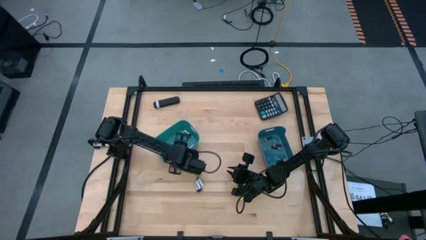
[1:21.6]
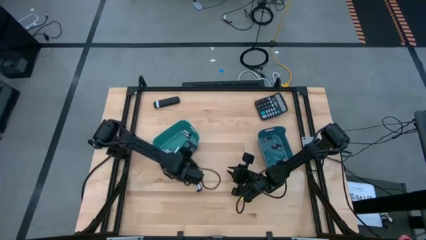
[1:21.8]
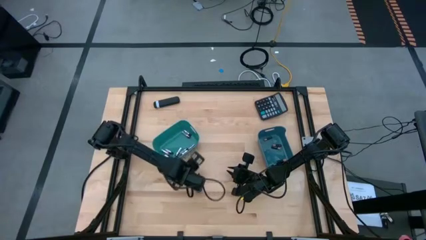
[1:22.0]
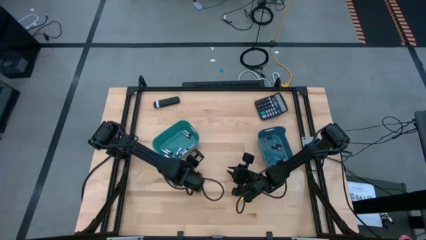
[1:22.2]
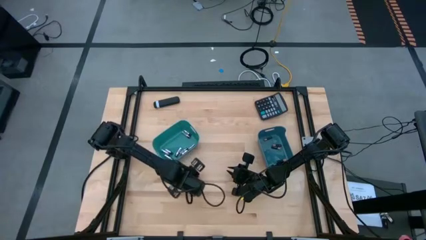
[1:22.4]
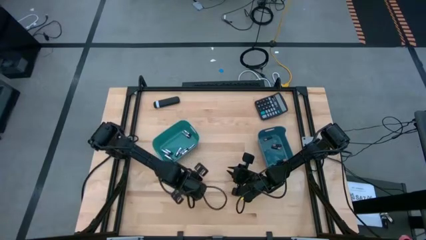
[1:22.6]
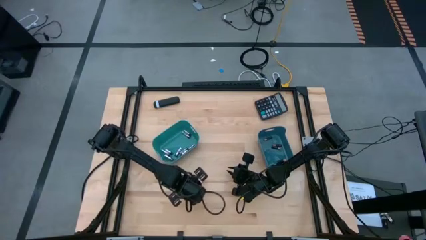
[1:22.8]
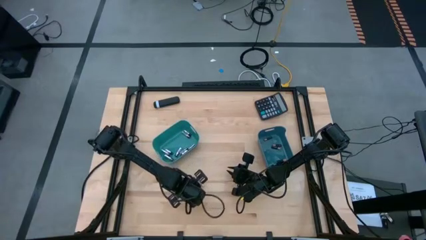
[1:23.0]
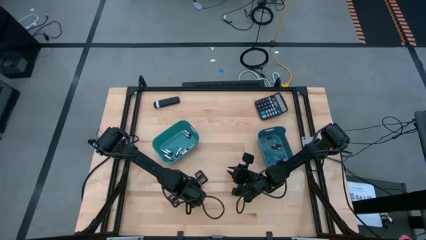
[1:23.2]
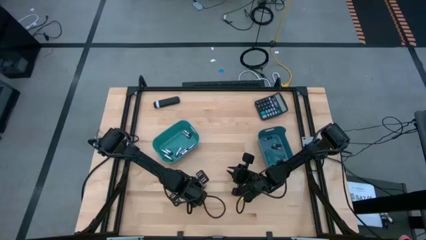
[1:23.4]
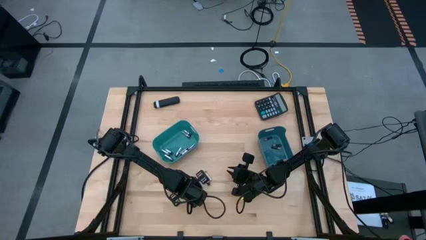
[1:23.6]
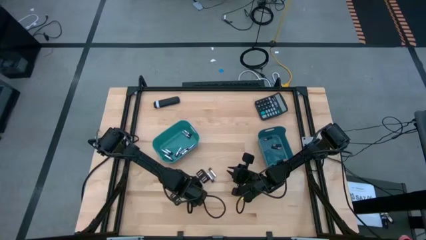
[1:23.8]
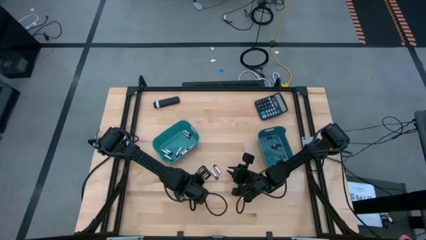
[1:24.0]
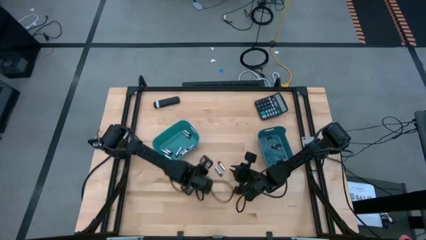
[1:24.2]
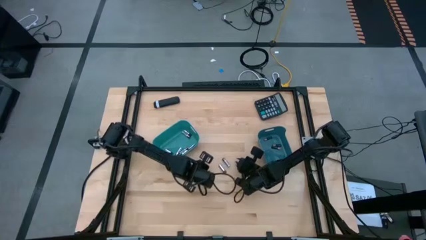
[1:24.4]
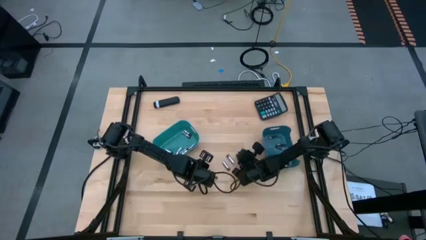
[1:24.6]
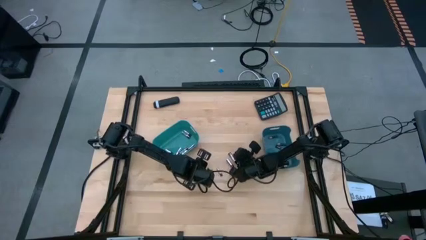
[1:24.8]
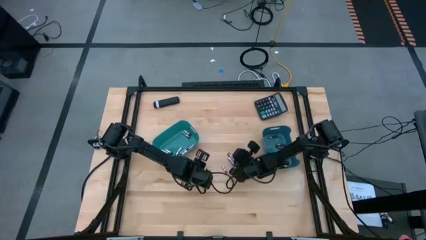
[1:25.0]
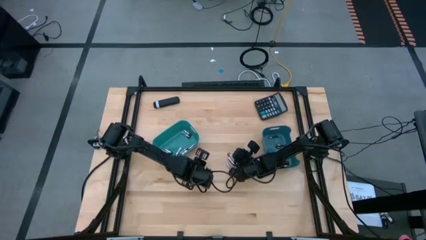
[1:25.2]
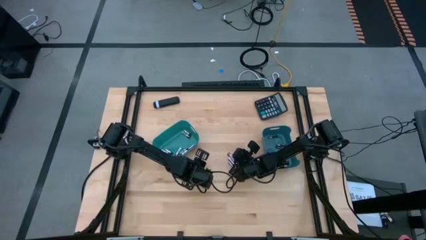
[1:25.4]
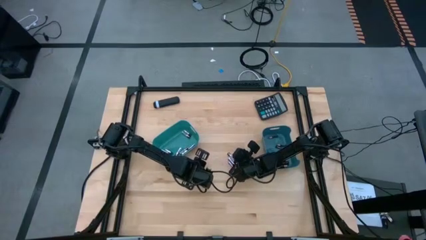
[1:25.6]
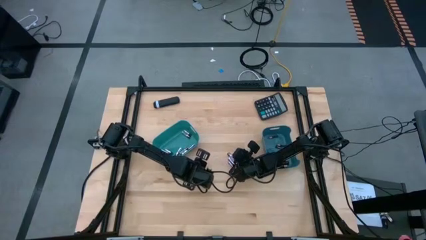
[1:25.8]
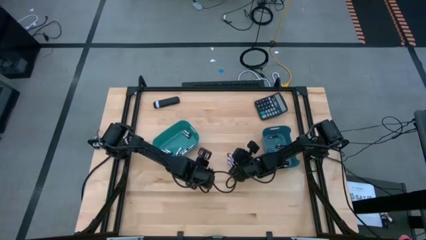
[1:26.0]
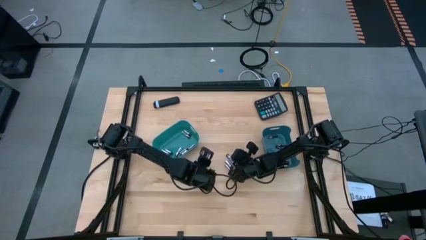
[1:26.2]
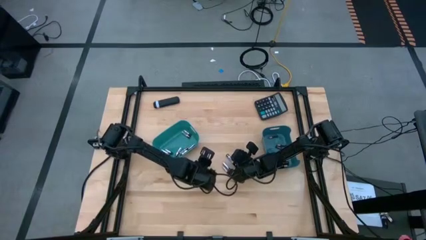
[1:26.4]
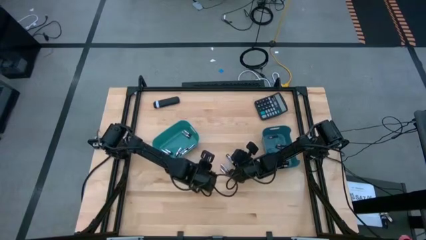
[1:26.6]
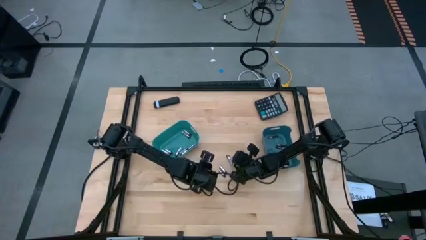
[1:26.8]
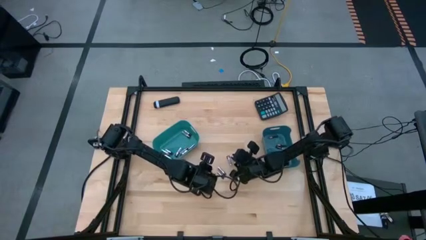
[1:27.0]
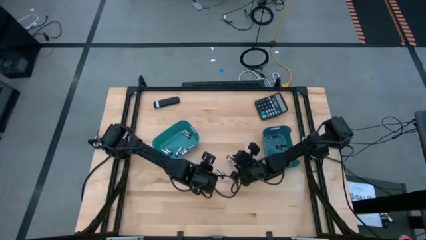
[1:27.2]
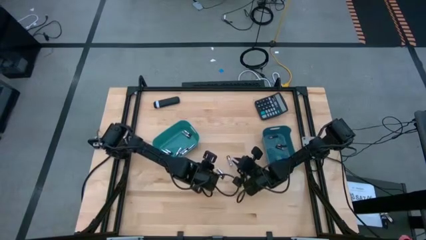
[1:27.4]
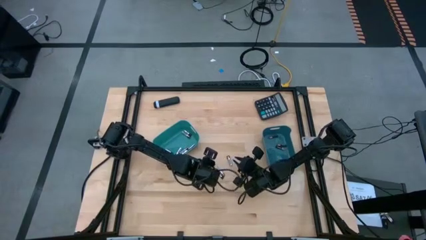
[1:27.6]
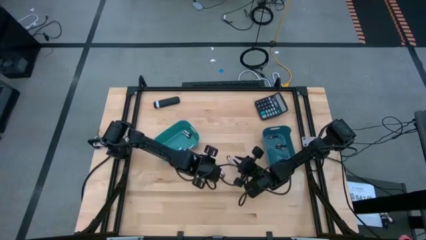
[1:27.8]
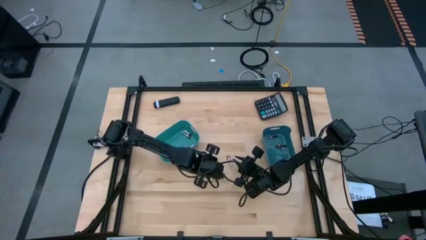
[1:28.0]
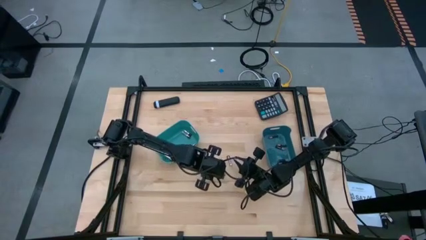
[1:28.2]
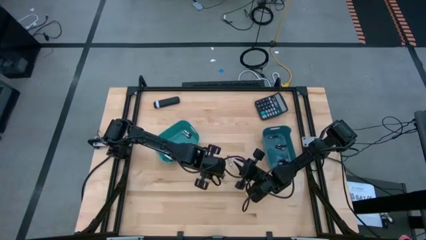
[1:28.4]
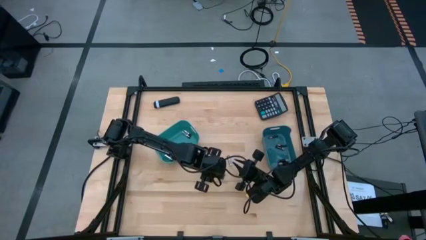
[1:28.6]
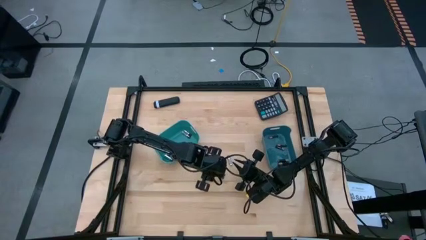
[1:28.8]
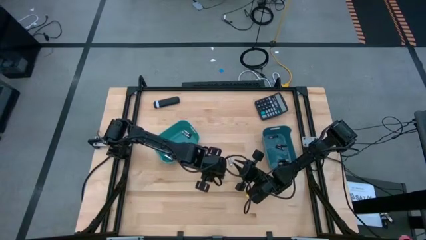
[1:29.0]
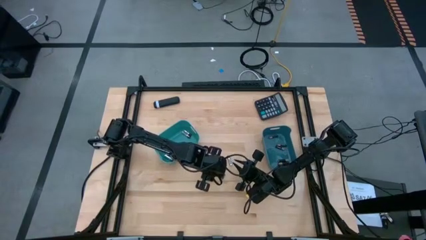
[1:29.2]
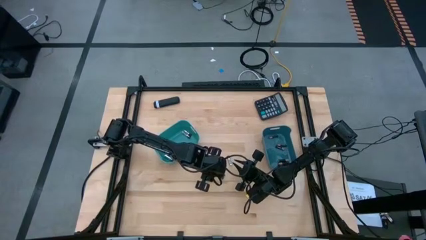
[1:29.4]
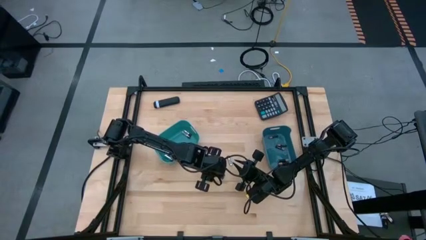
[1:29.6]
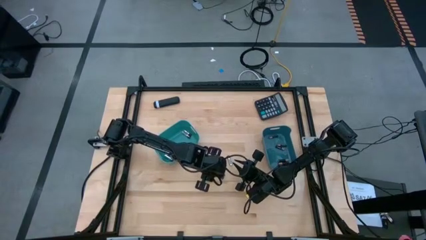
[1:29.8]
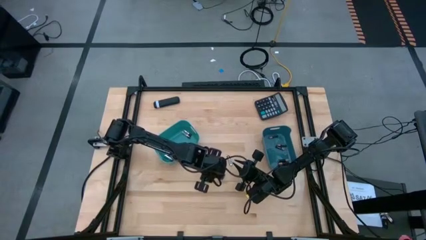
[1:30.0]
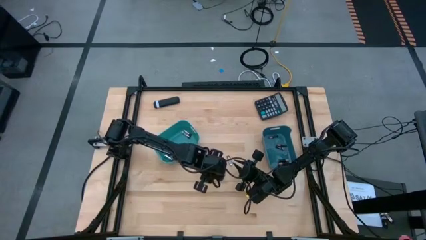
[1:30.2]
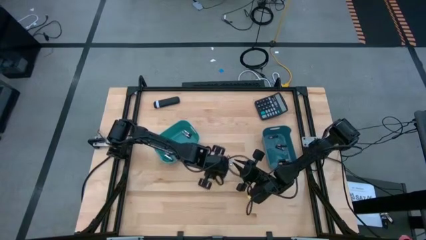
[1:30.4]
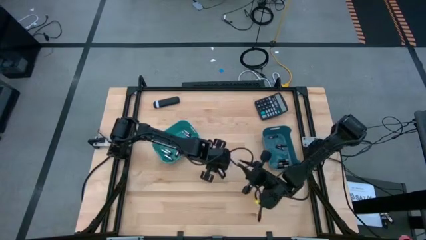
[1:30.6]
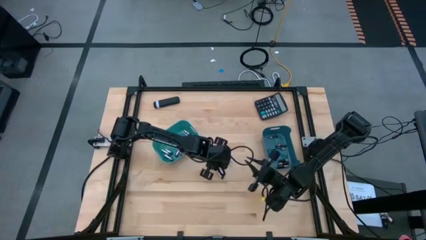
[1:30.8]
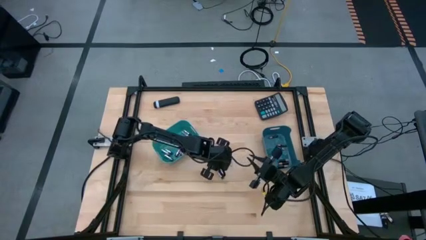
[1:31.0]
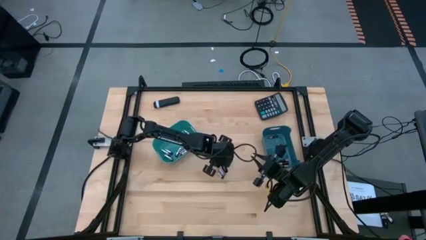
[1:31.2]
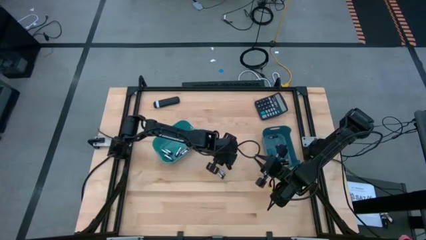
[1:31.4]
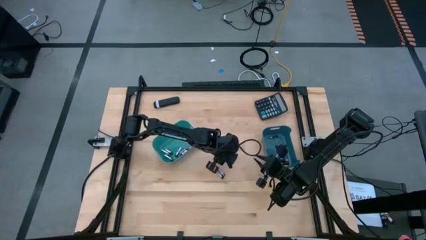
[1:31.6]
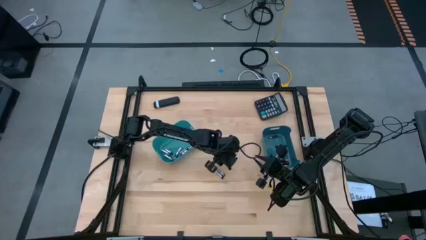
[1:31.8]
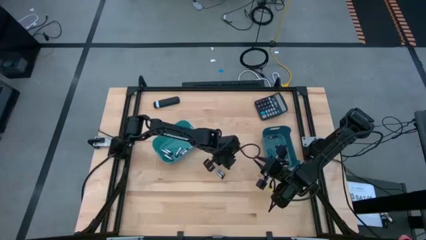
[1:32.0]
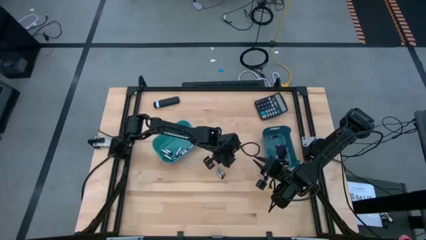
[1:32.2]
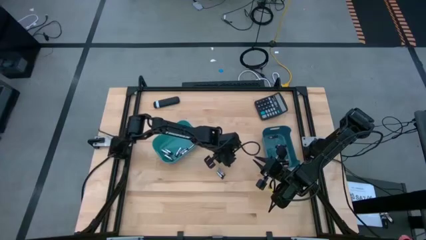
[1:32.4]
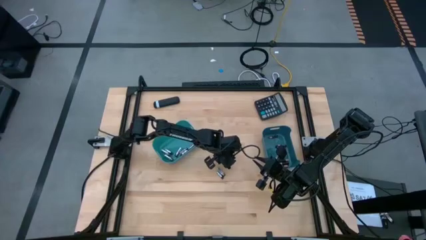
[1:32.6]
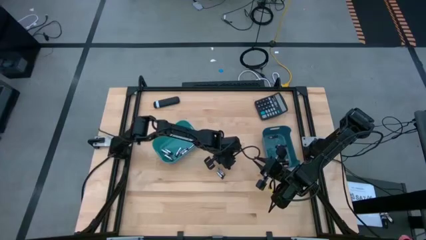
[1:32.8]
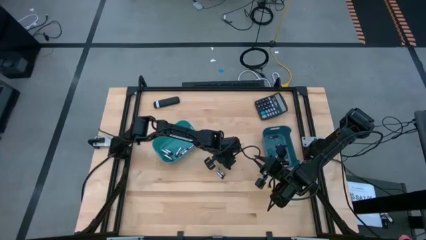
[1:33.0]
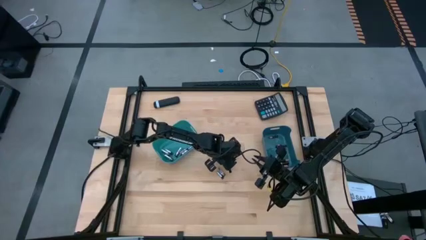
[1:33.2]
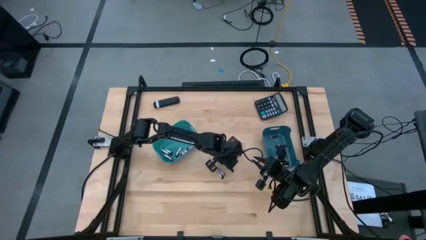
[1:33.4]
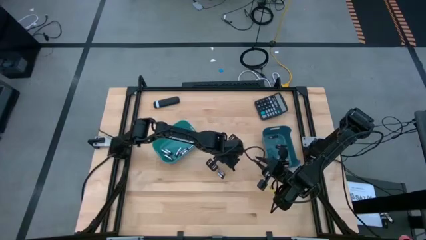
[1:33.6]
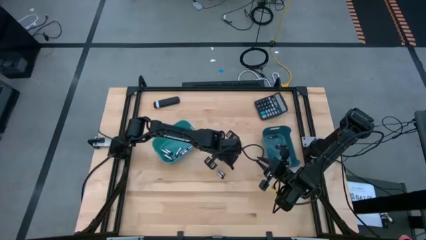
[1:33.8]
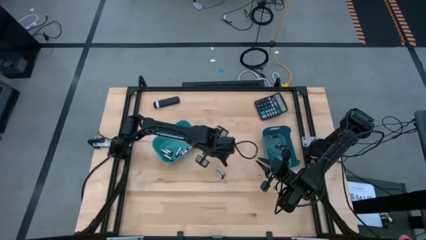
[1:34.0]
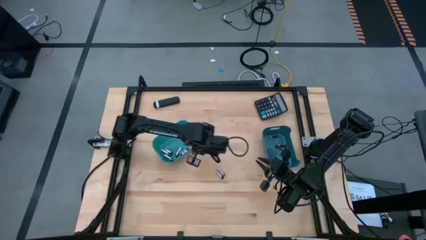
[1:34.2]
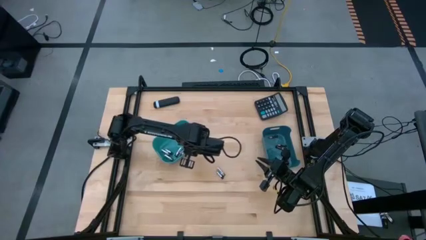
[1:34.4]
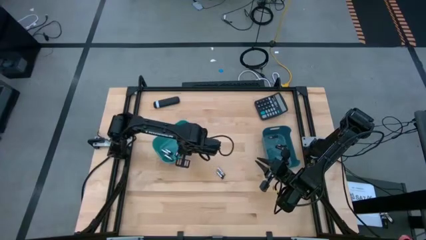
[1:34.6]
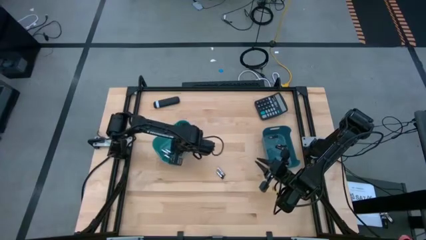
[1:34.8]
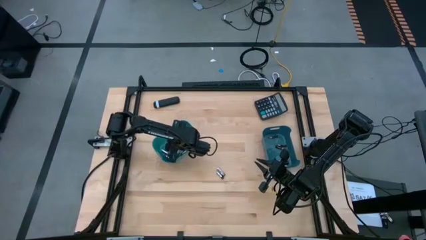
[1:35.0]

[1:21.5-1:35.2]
Task: Sort batteries
Put the white battery into the green bin
